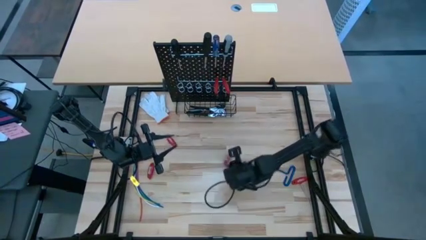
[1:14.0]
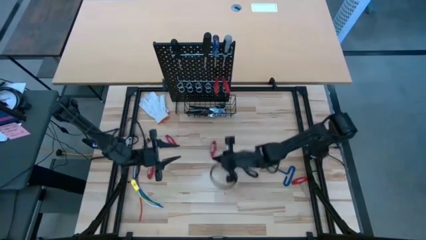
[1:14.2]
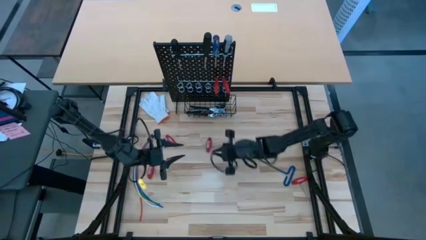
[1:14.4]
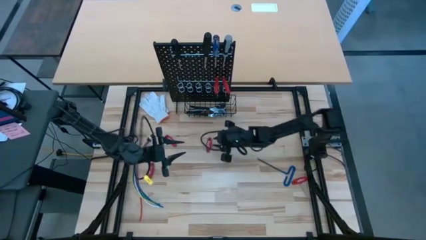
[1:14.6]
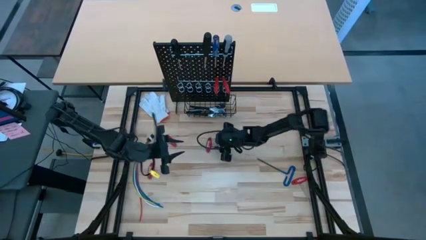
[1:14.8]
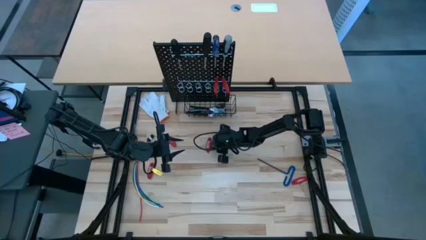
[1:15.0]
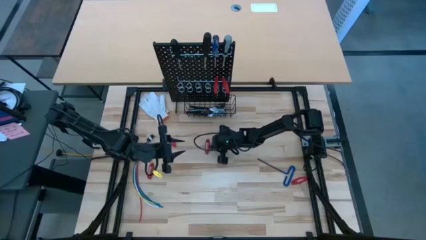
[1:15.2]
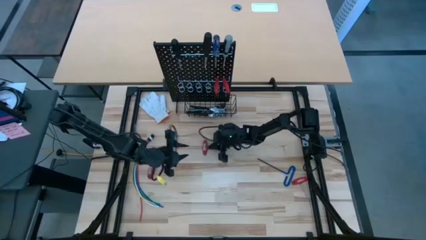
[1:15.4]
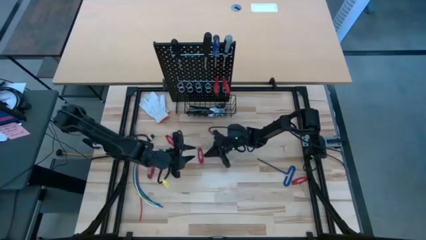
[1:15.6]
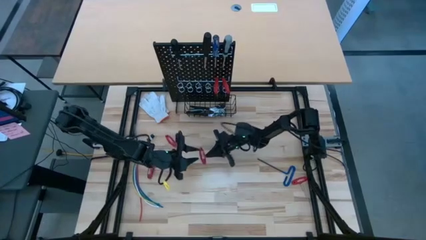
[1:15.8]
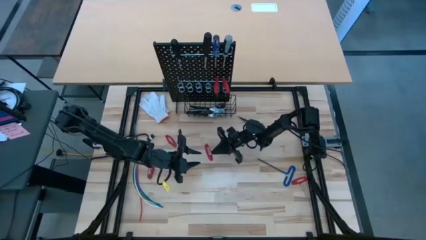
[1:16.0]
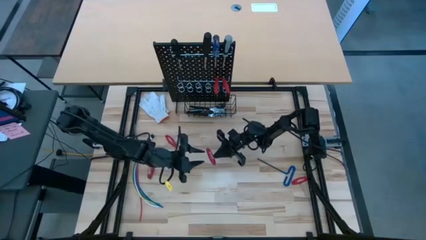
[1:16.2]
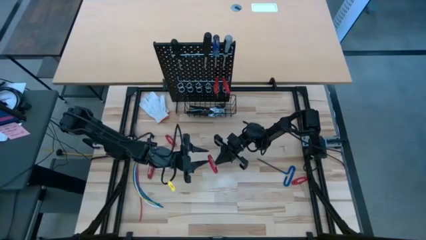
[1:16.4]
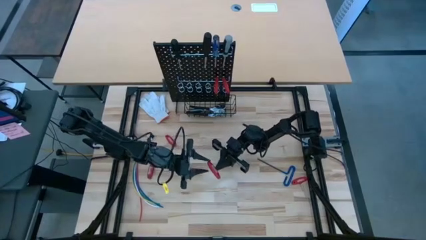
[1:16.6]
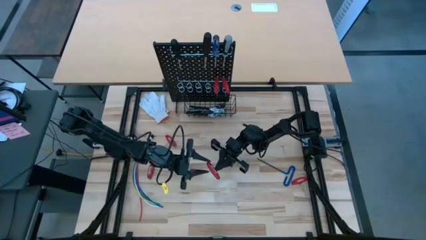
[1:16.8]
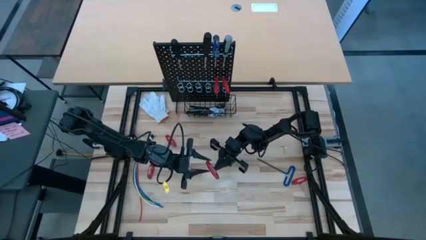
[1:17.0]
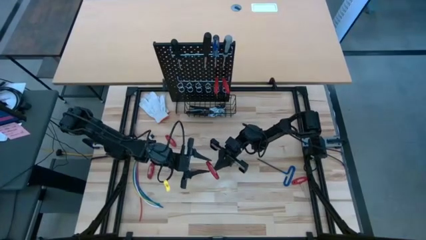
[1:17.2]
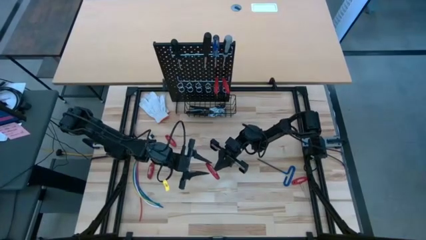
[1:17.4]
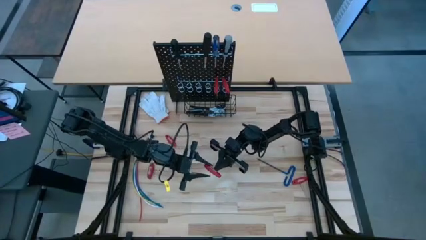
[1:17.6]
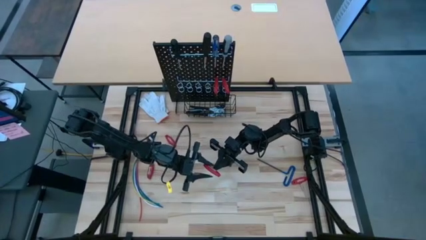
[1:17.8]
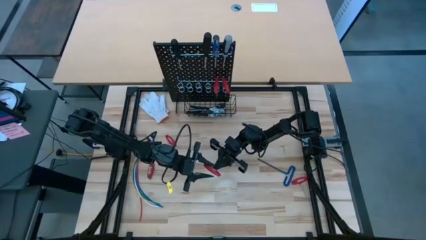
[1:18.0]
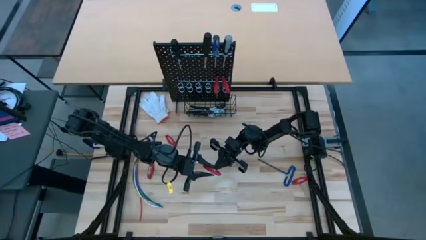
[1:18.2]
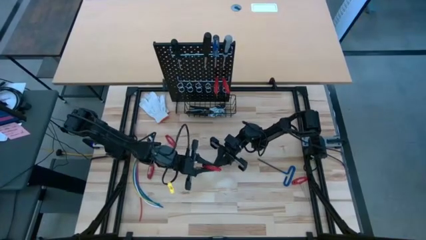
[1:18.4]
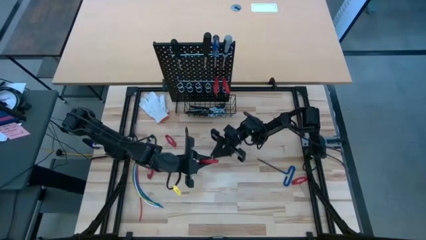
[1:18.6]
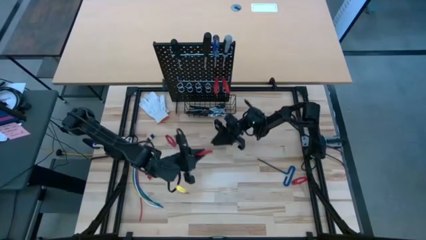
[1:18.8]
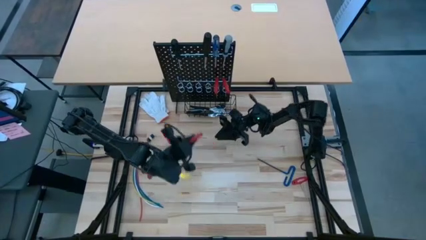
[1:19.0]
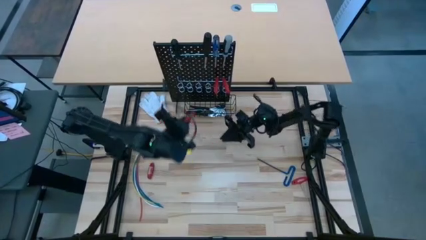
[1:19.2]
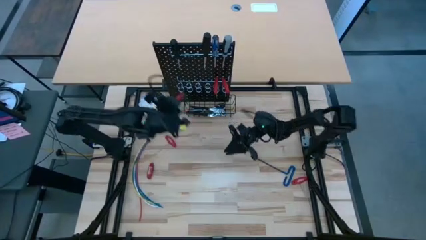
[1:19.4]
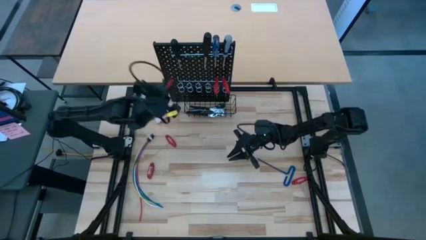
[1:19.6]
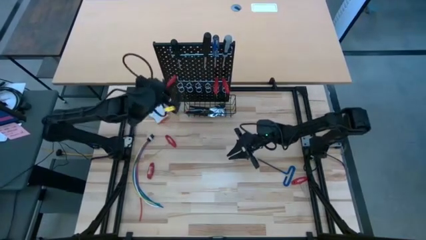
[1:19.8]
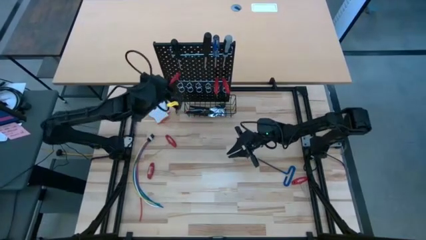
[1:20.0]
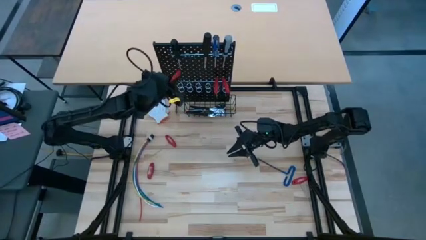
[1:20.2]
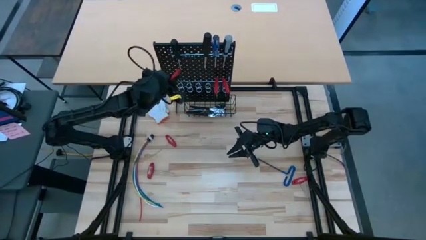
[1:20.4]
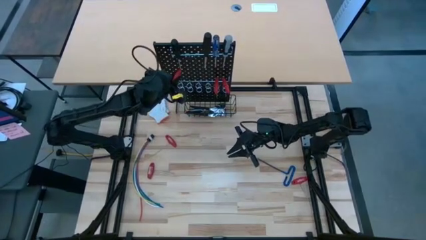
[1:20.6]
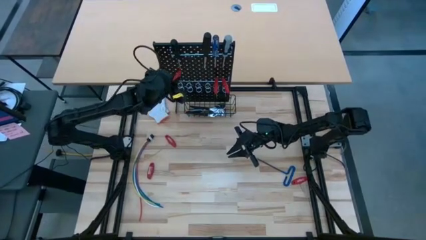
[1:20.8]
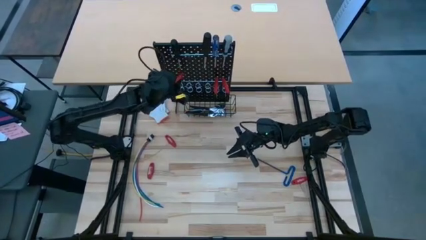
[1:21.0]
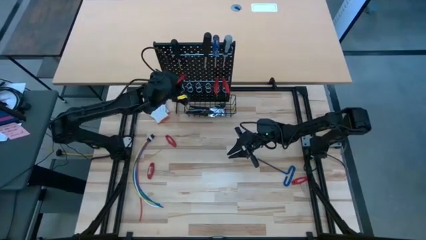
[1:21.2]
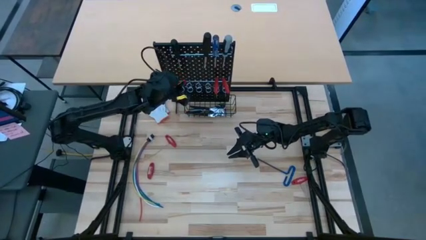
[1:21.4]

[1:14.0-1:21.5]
Task: Hang tools onto peg board
Hang the red allen wrench on the black pegboard

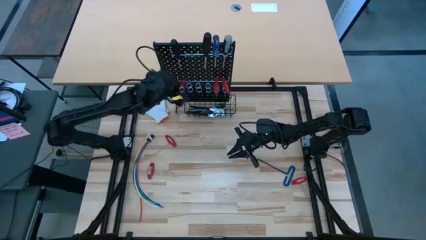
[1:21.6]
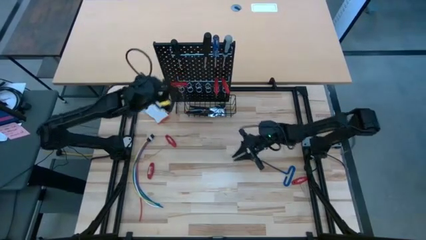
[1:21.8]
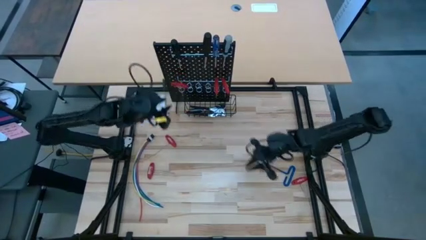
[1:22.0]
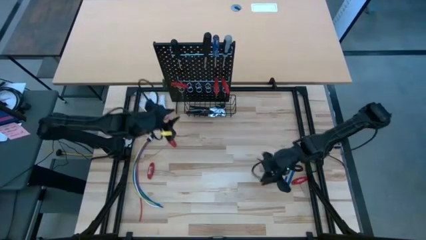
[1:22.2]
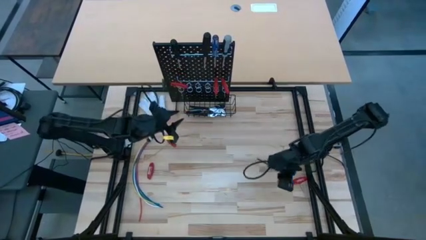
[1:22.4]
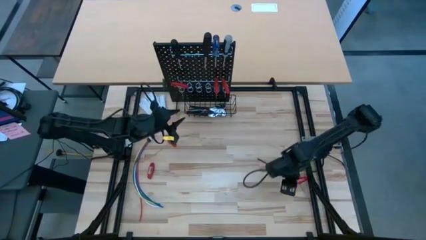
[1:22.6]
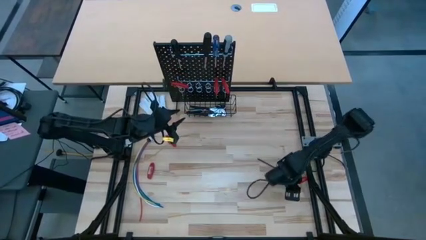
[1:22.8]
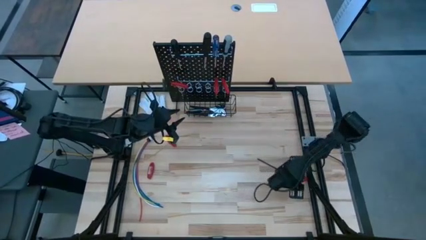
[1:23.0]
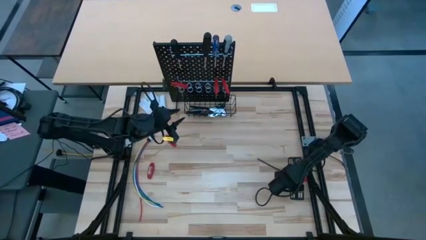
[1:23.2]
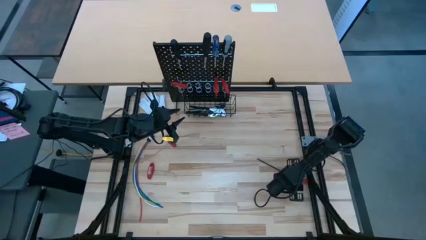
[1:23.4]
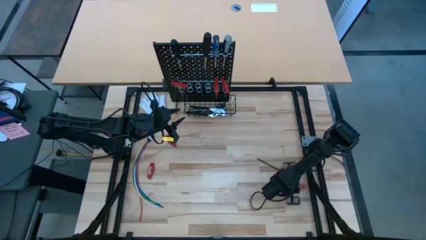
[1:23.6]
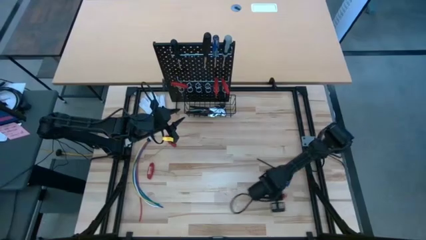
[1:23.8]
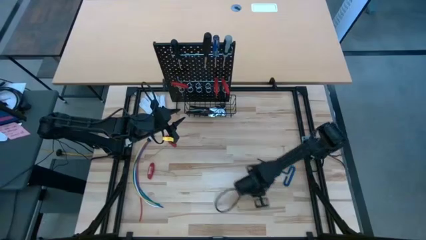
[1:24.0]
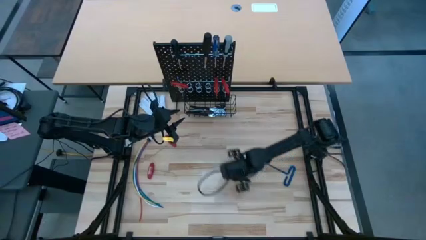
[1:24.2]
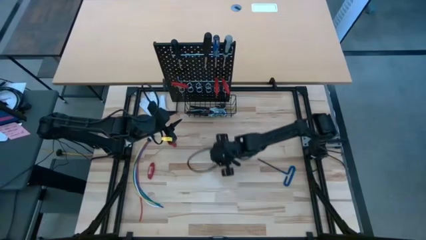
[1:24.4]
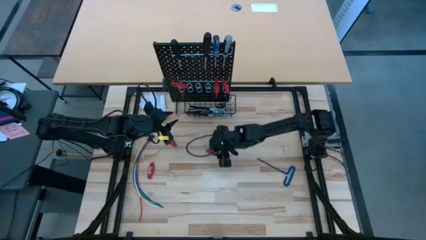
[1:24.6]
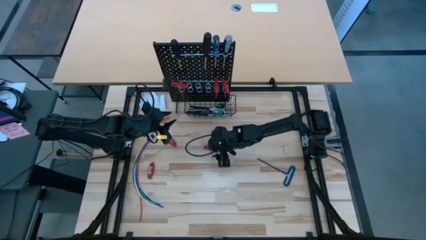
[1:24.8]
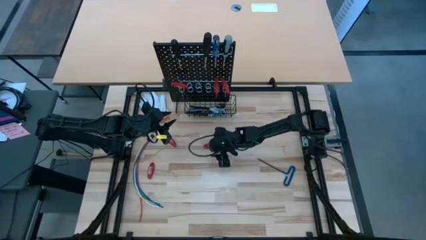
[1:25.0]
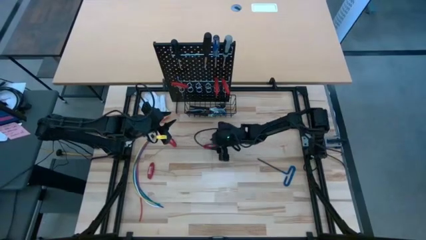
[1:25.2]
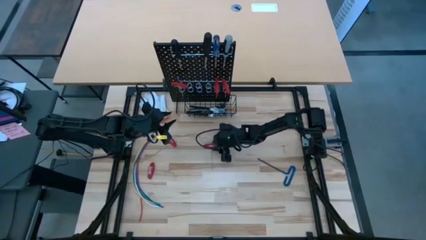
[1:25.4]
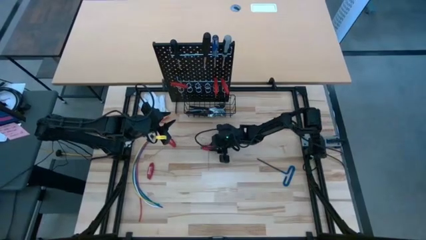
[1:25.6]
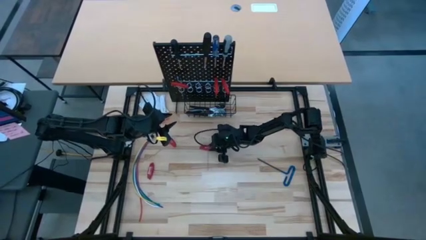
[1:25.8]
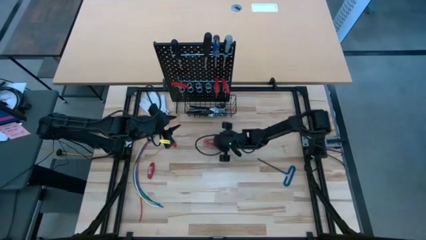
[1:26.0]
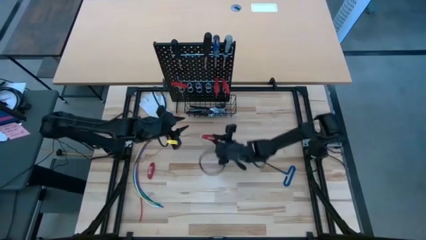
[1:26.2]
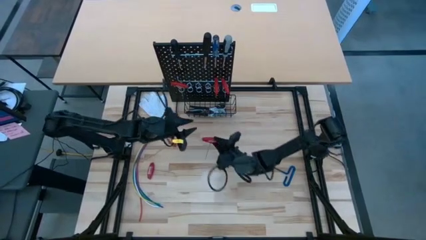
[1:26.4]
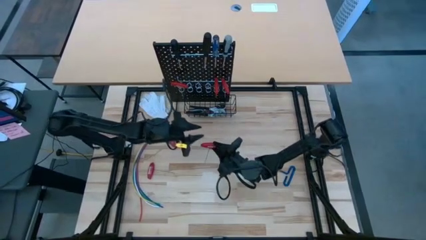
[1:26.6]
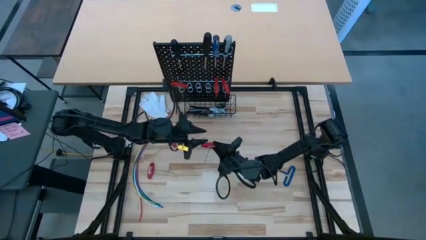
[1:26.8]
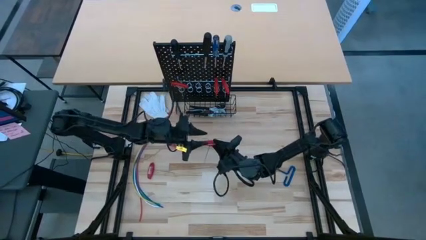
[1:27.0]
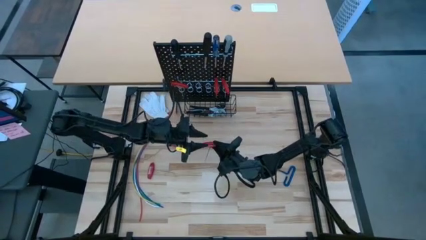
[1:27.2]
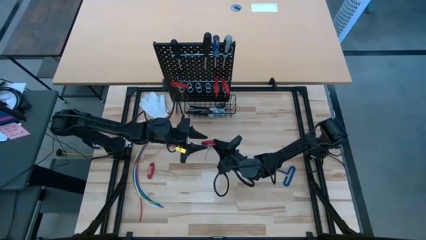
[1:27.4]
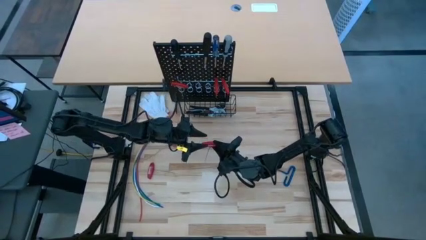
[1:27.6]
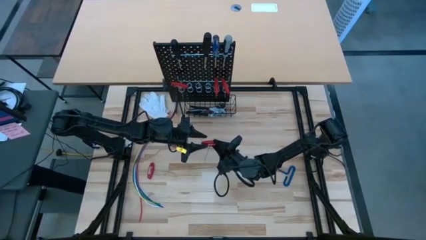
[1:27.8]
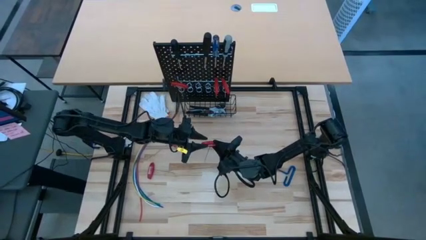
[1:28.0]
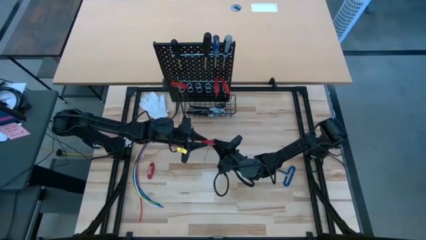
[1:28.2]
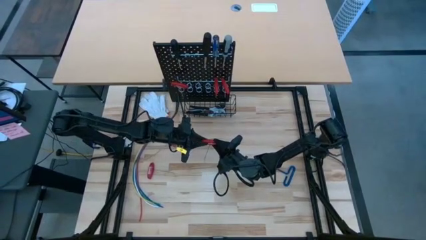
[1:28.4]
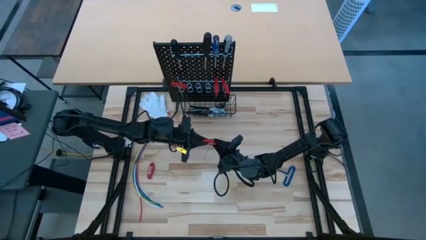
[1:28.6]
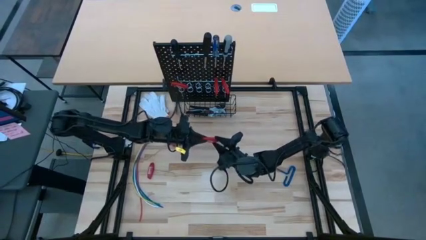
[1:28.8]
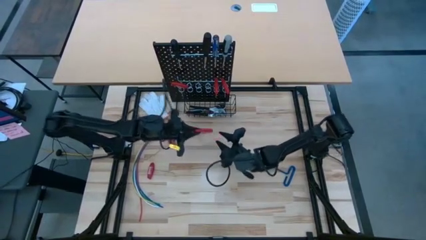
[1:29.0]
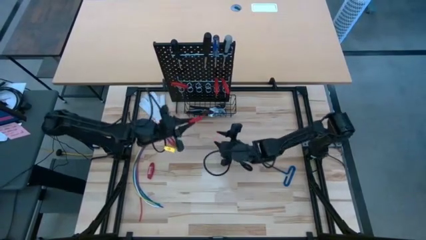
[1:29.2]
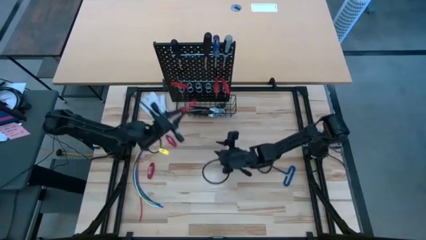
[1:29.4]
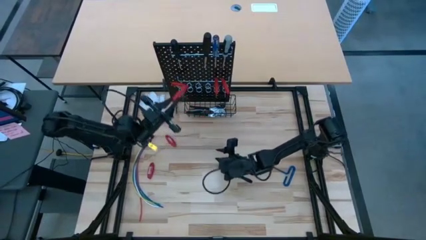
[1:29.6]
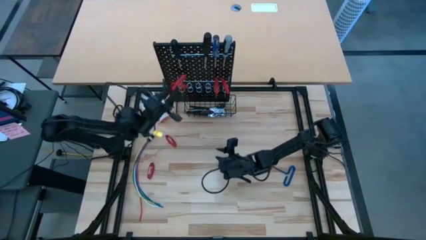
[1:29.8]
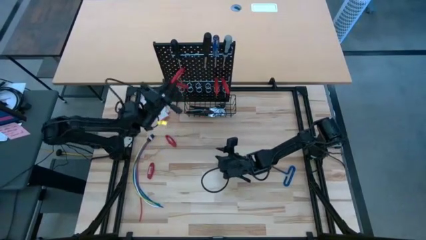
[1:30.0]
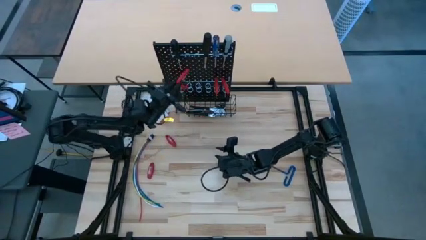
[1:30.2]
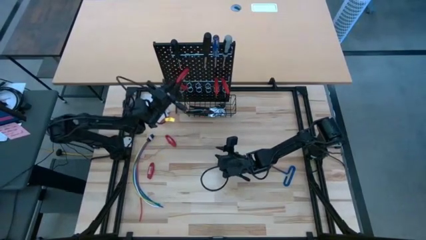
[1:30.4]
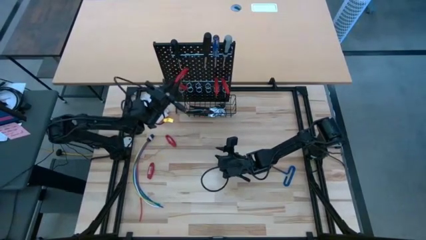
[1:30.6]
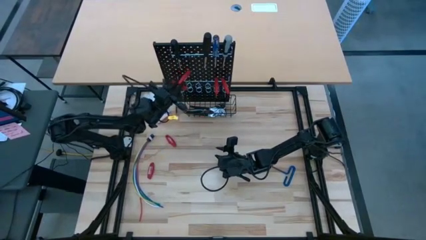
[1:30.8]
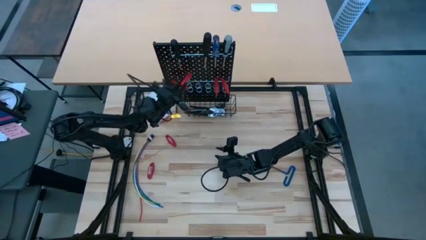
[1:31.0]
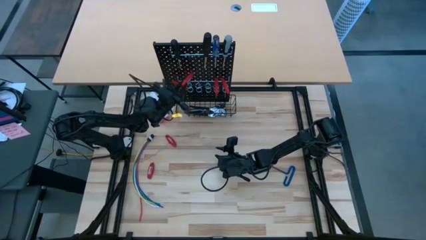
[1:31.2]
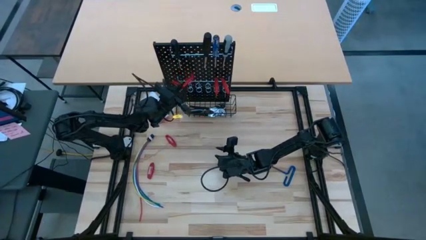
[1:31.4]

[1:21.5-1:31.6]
Hang the red allen wrench on the black pegboard
